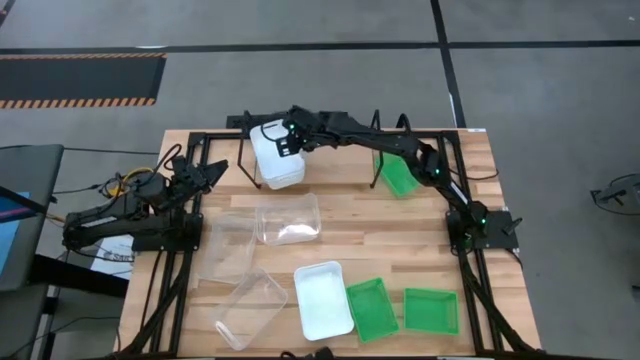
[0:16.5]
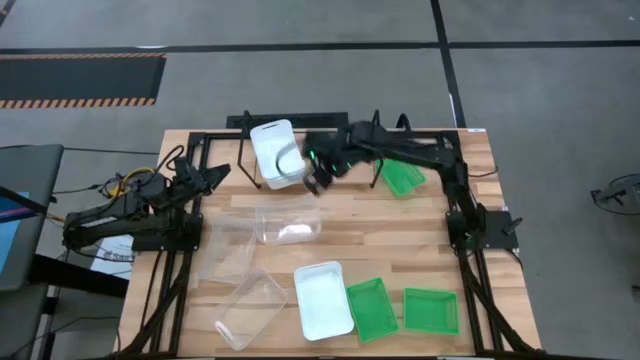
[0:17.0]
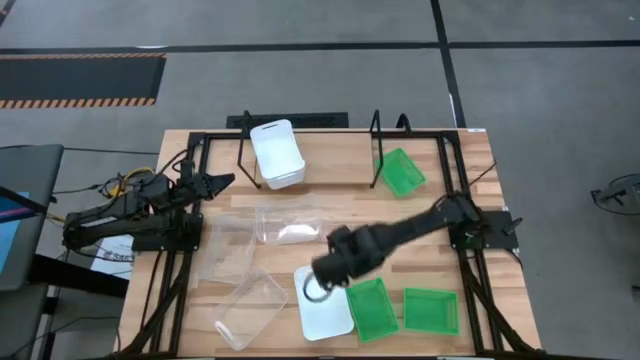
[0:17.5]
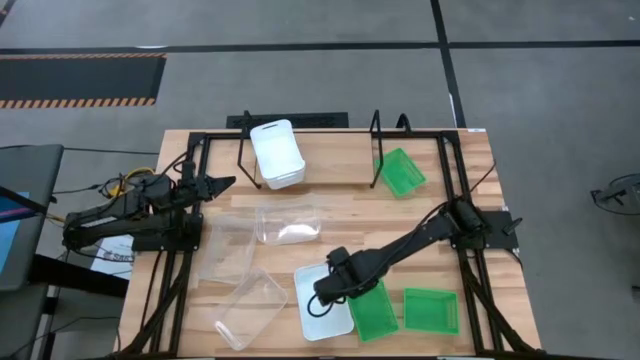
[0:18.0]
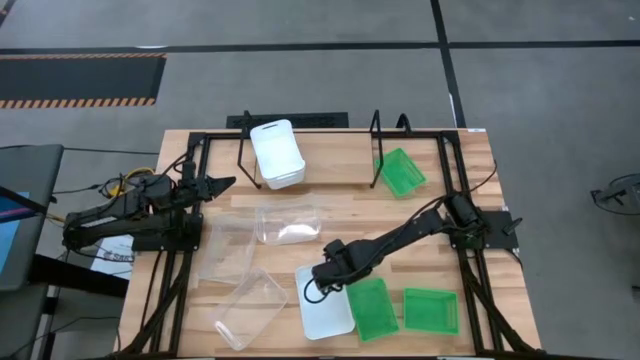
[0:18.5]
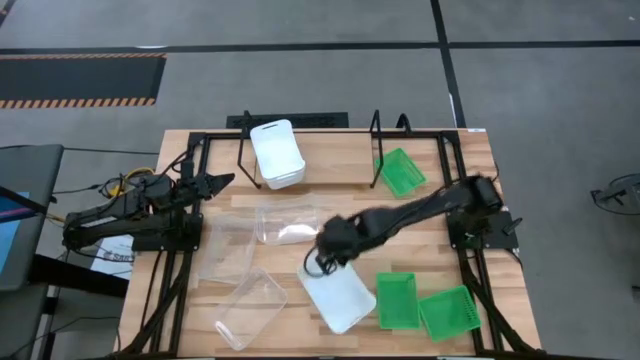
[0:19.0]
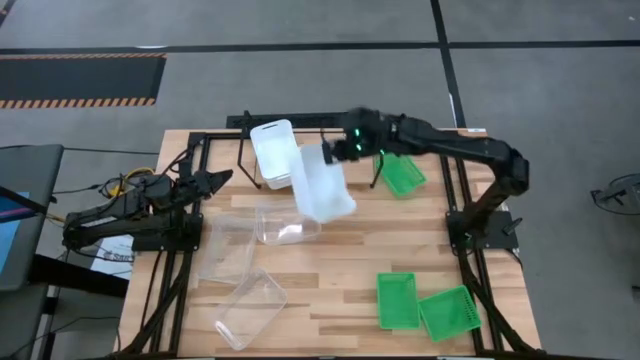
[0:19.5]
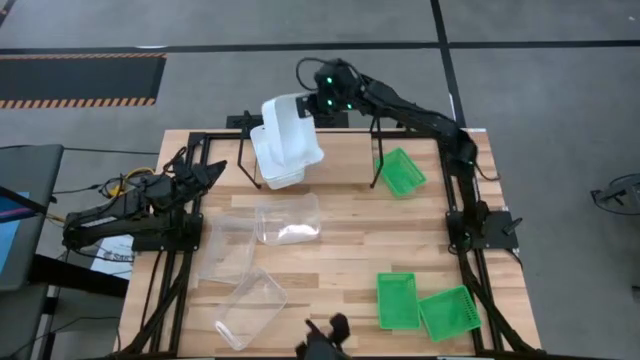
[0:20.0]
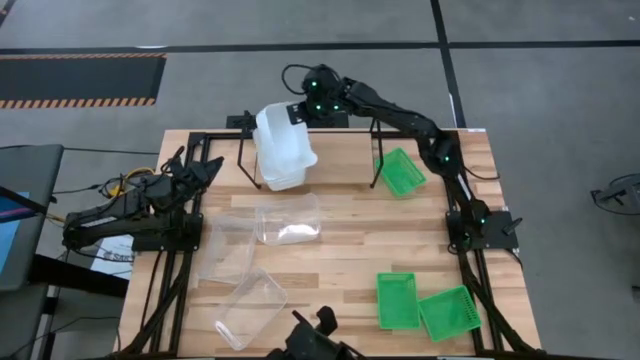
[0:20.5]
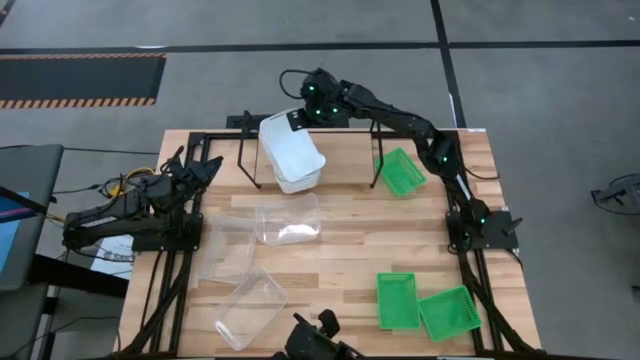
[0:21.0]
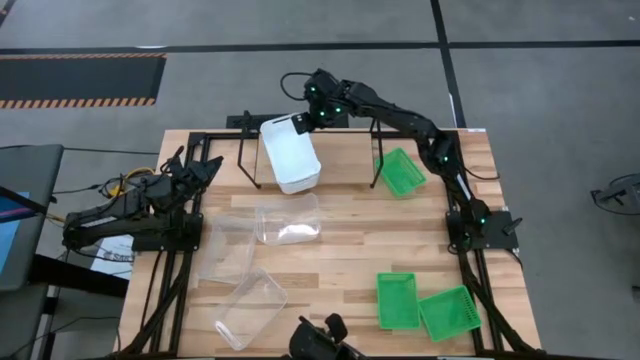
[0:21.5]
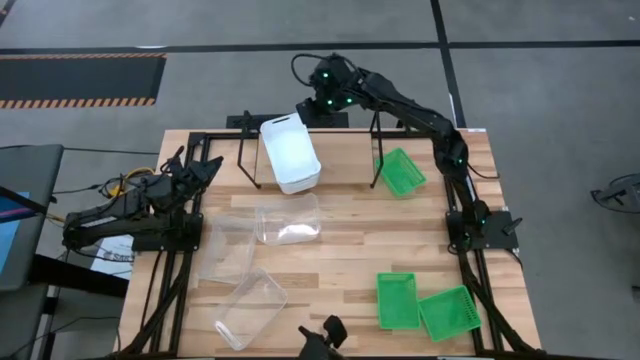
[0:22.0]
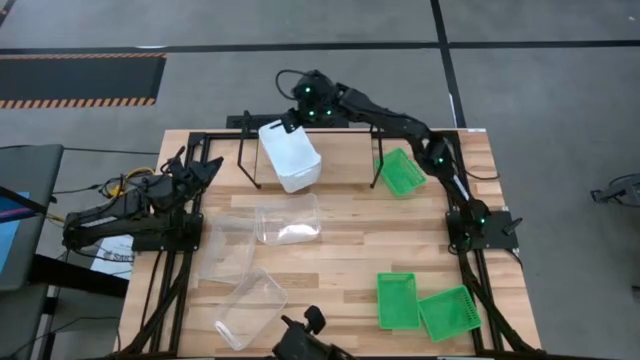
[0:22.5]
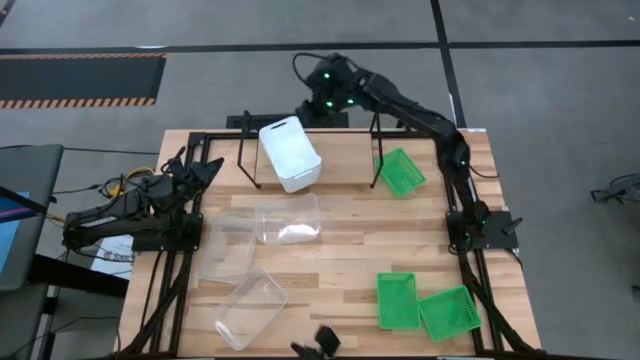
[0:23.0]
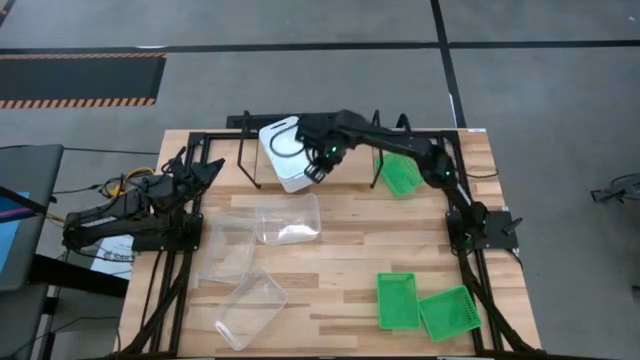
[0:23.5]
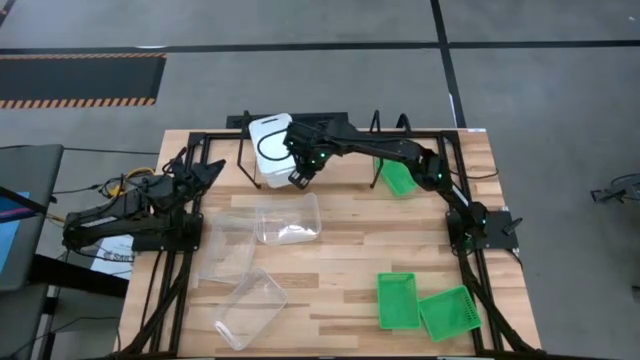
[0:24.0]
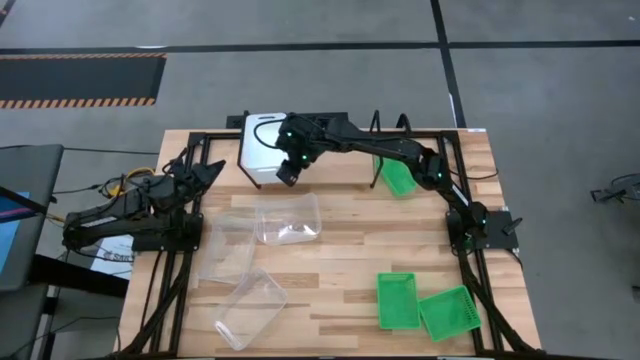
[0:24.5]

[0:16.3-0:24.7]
Task: Stack baskets on shelf by color
Stack the white bin on top of the white bins on the shelf

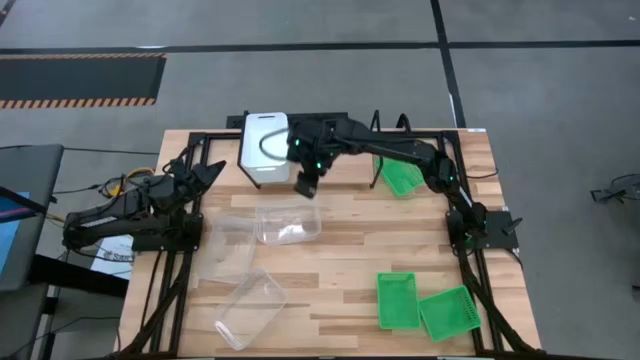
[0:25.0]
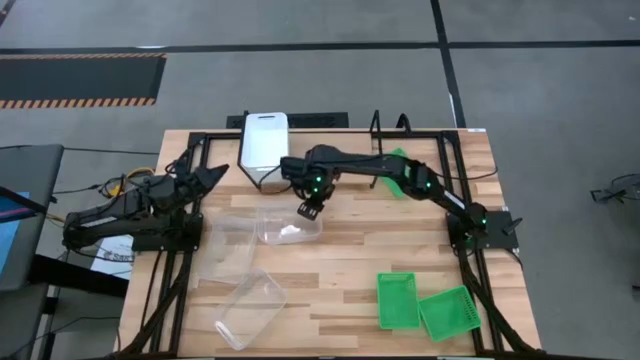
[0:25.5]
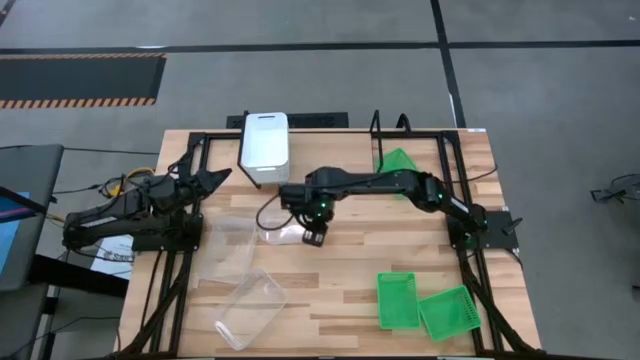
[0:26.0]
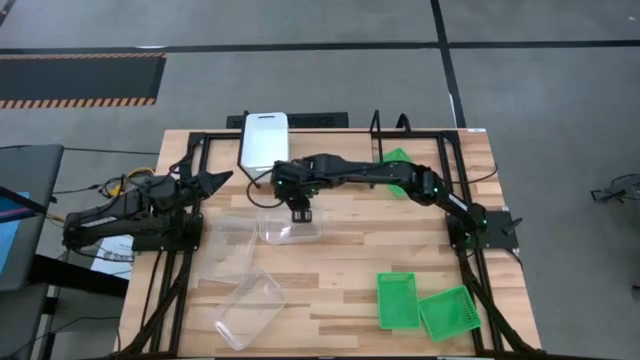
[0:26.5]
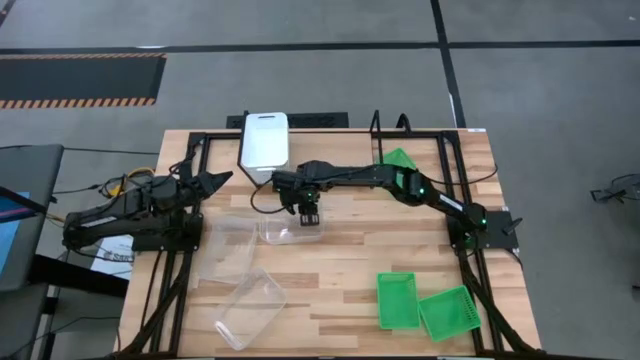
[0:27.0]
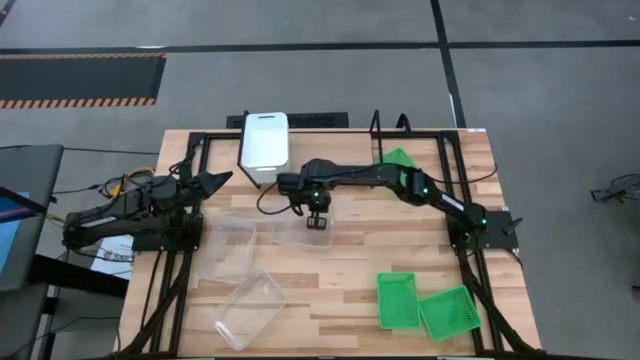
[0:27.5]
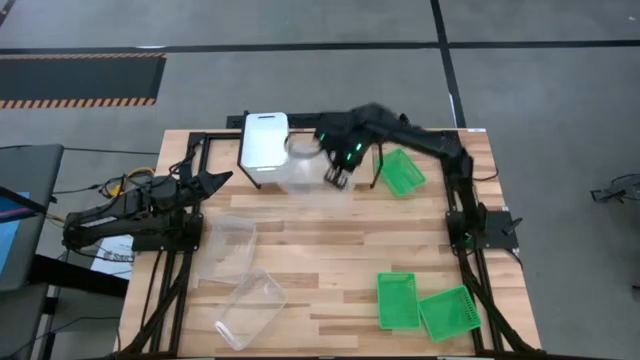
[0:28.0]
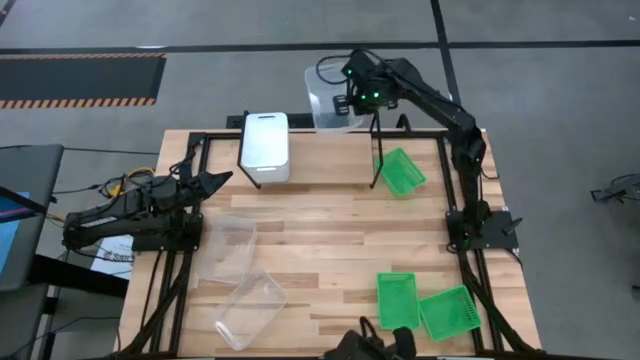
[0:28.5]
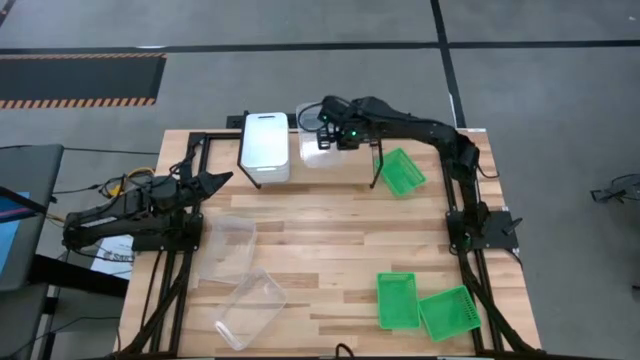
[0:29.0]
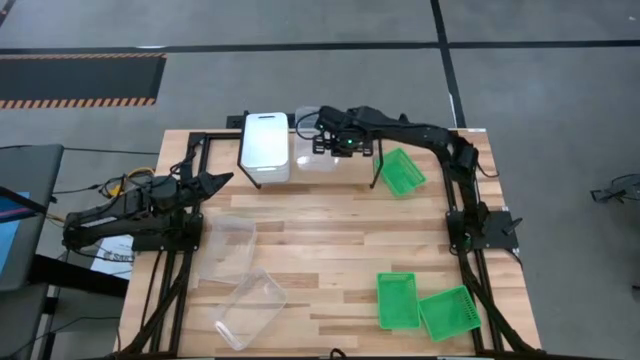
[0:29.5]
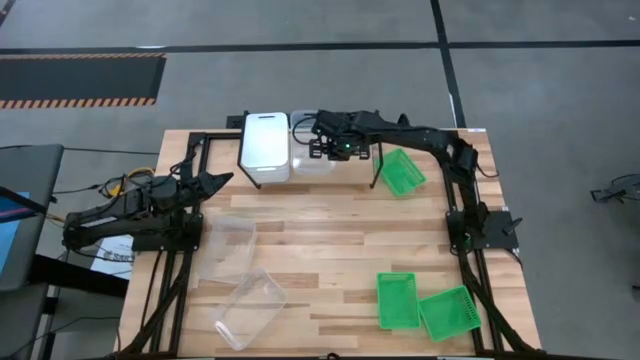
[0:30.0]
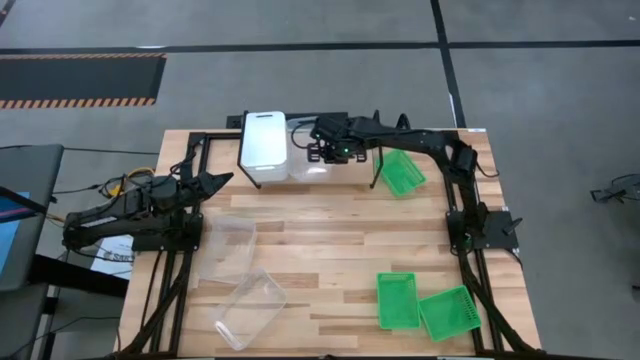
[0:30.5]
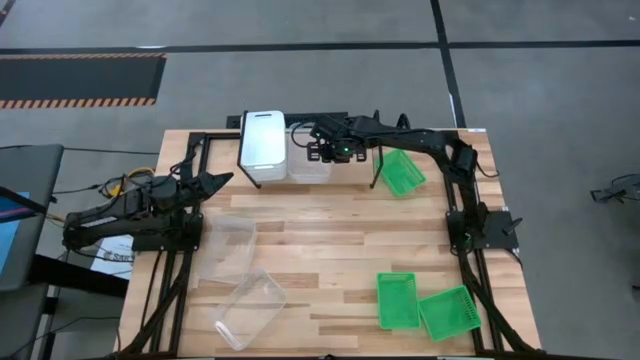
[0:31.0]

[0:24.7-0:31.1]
Put the top transparent bin on the shelf

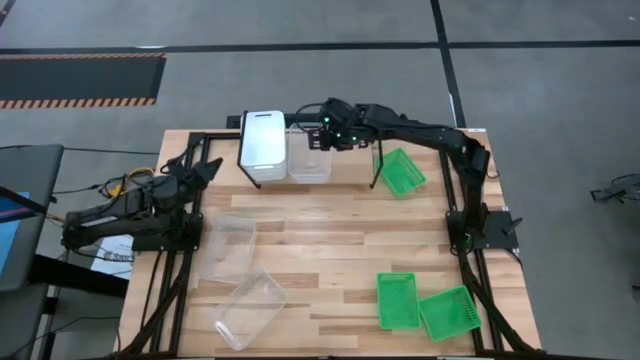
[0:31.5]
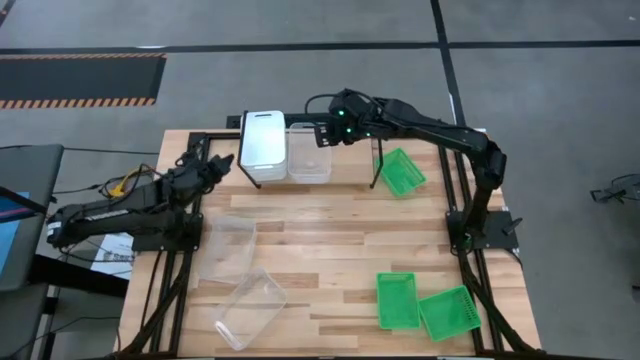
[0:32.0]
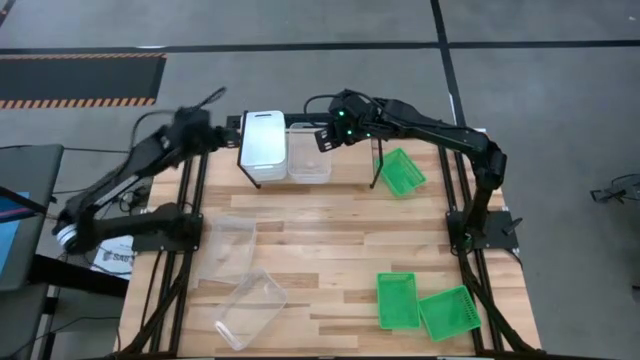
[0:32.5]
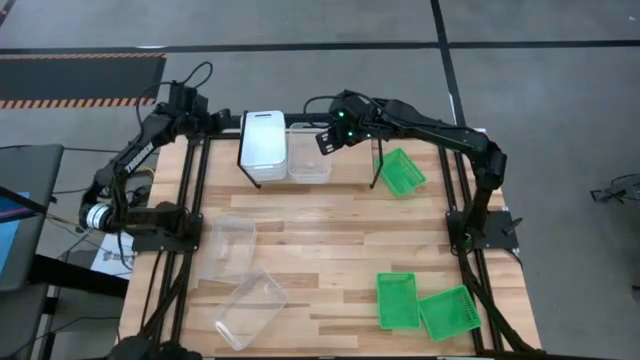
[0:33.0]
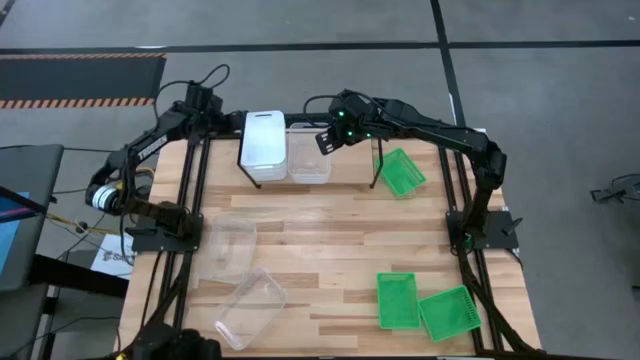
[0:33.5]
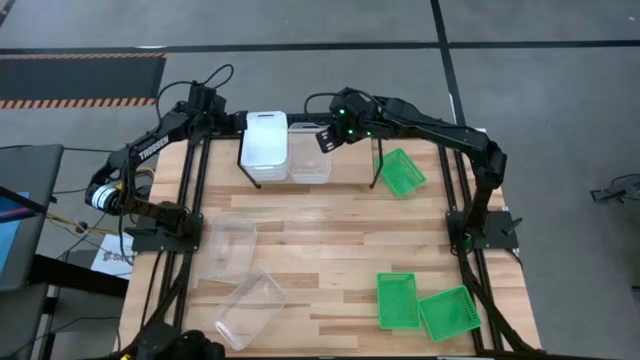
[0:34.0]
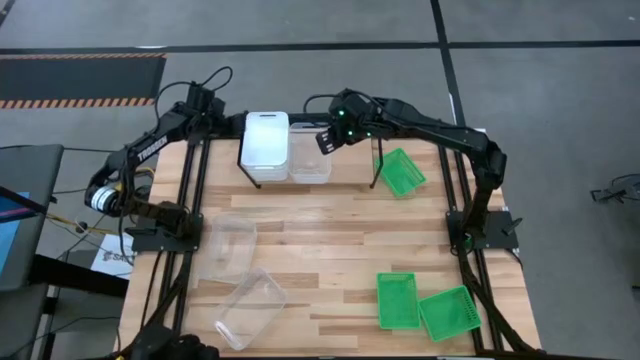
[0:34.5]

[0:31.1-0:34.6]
Adjust the stacked white bins on the shelf

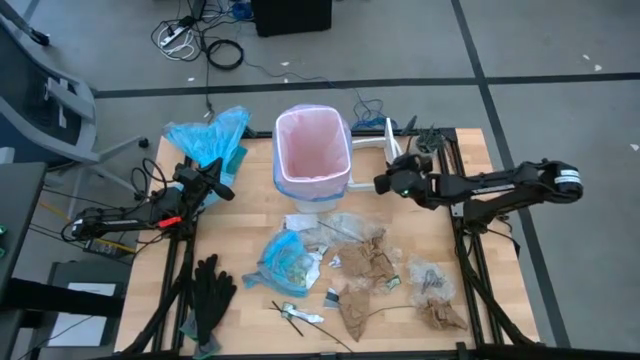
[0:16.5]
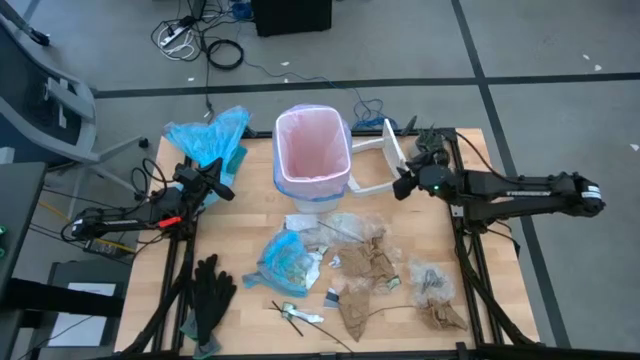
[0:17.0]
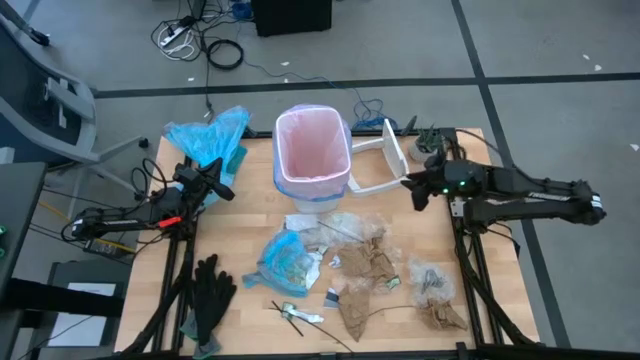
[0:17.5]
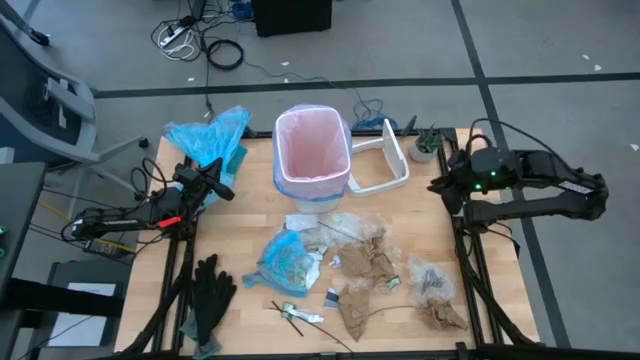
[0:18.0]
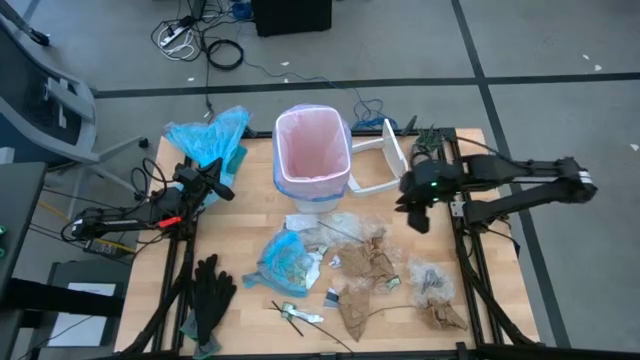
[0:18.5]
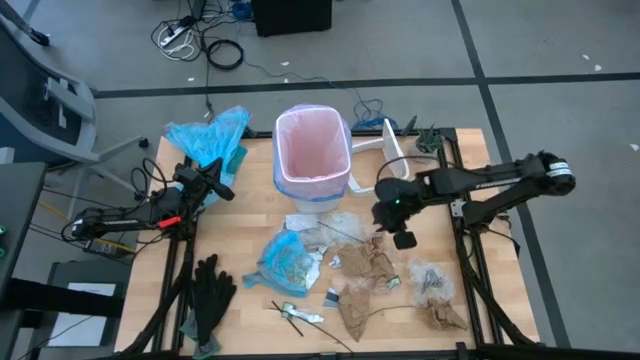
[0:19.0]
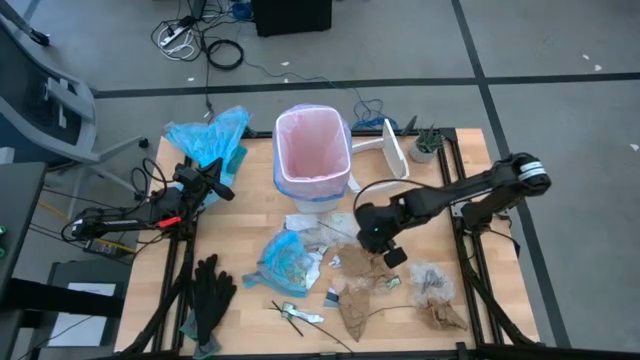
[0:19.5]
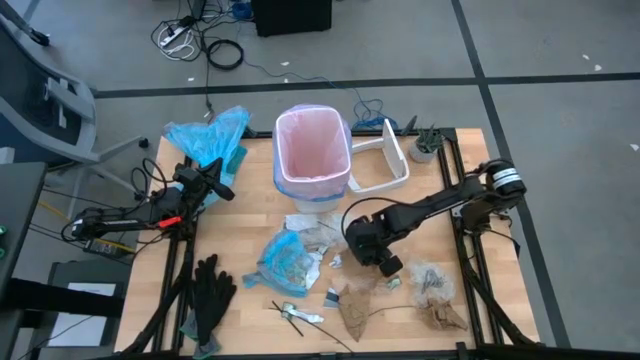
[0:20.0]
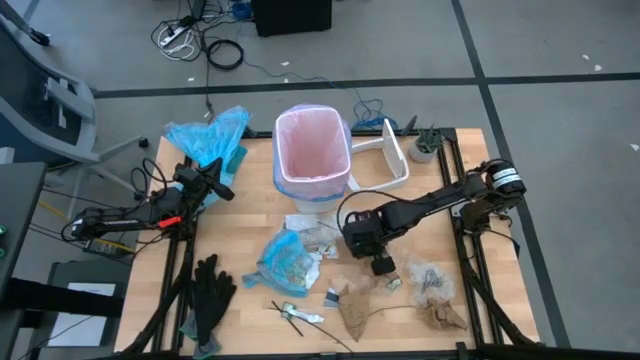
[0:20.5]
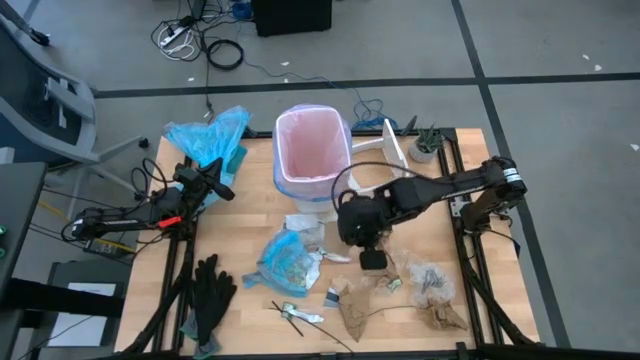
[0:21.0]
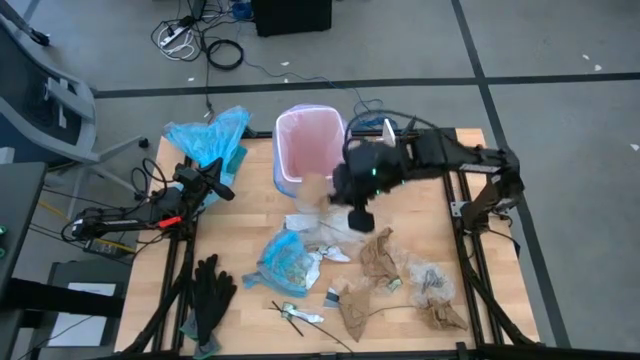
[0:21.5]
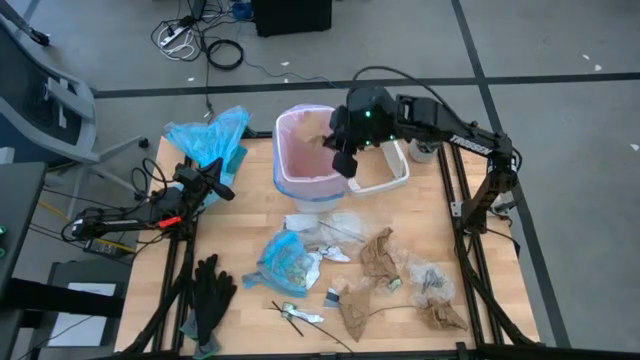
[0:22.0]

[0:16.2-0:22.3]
Task: place trash/remove bag and relplace
Put the top left brown napkin into the trash bin
